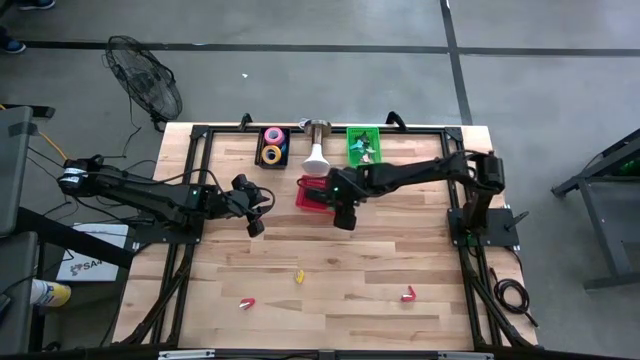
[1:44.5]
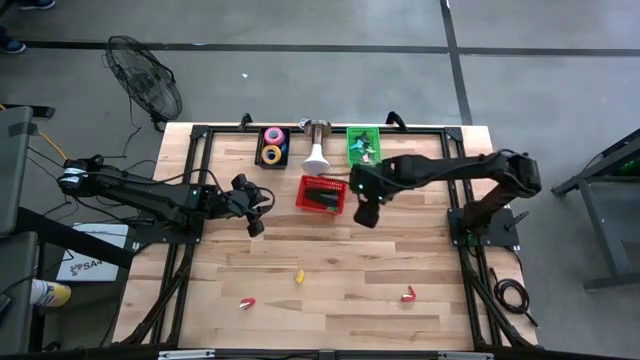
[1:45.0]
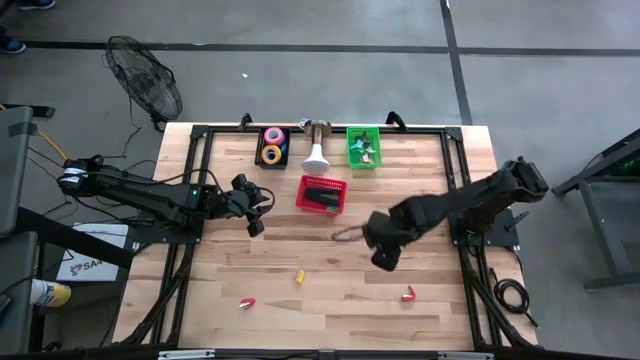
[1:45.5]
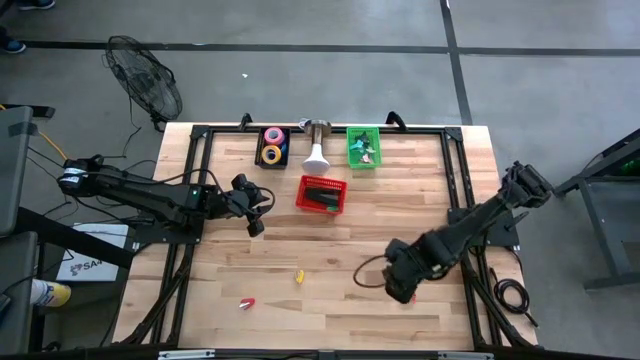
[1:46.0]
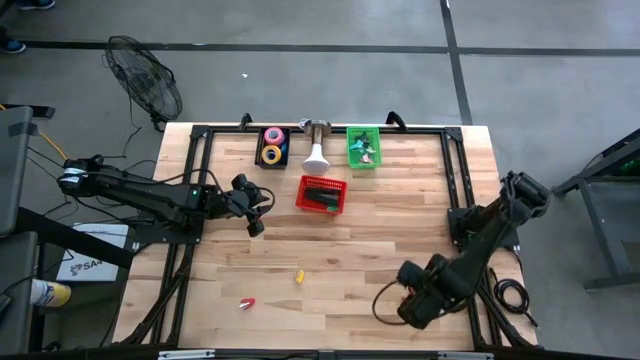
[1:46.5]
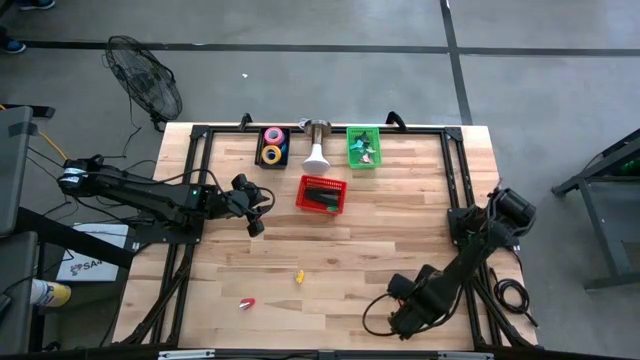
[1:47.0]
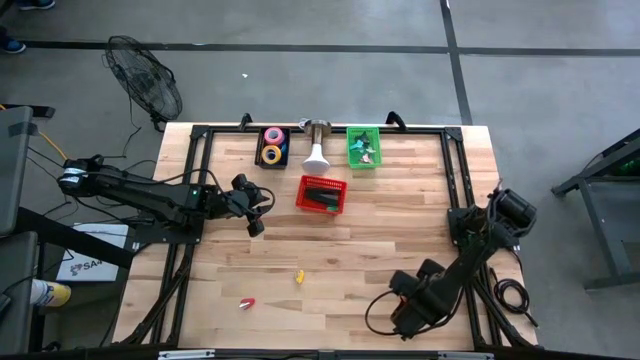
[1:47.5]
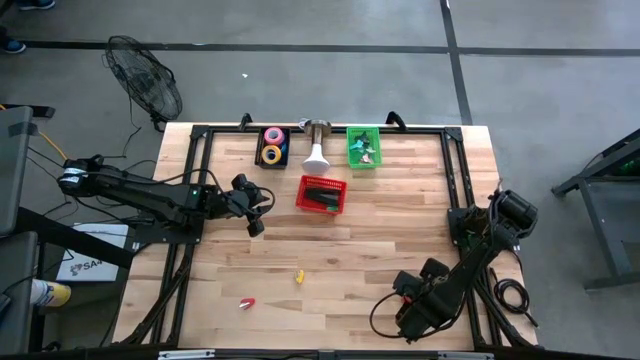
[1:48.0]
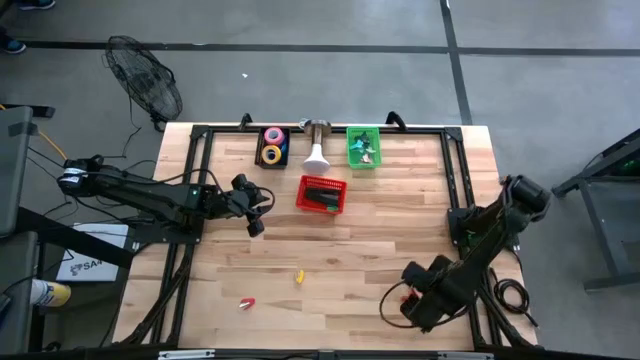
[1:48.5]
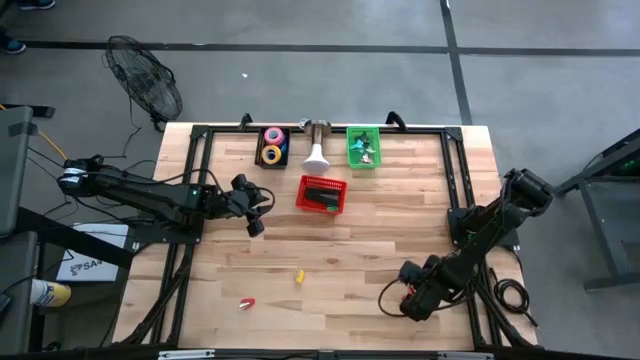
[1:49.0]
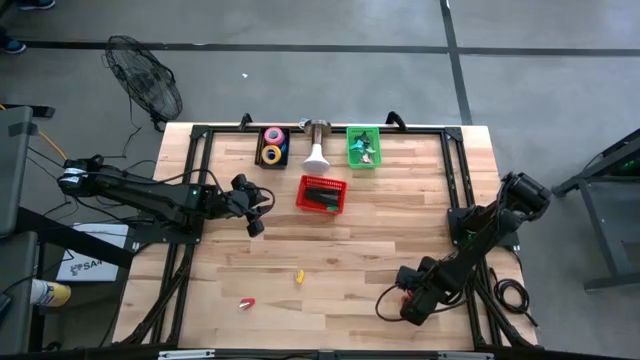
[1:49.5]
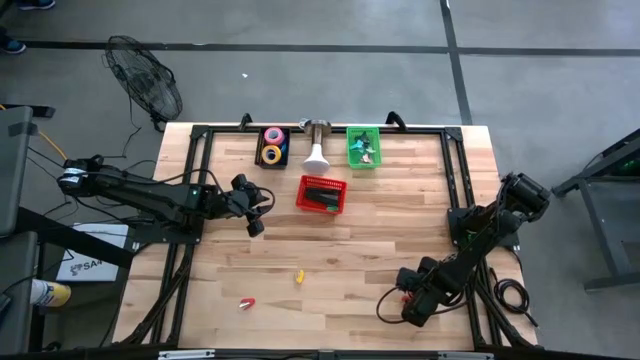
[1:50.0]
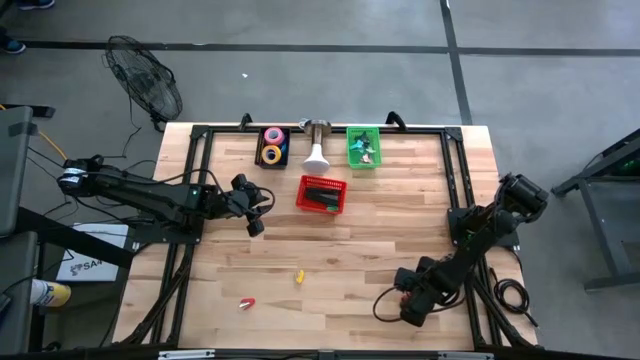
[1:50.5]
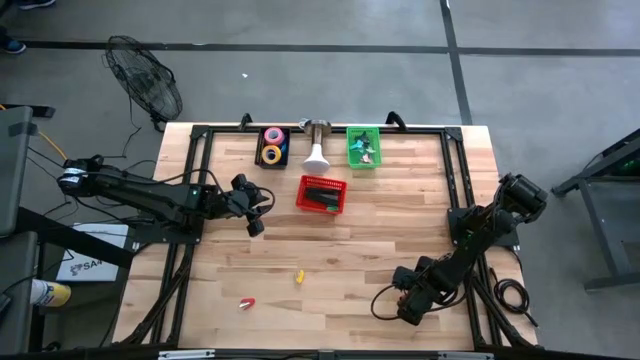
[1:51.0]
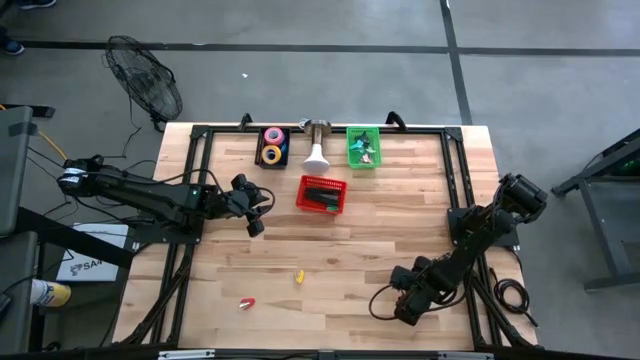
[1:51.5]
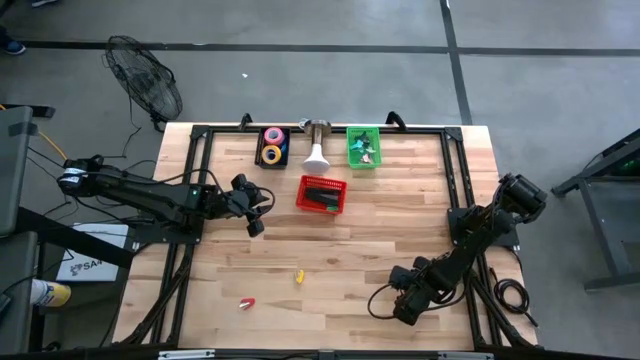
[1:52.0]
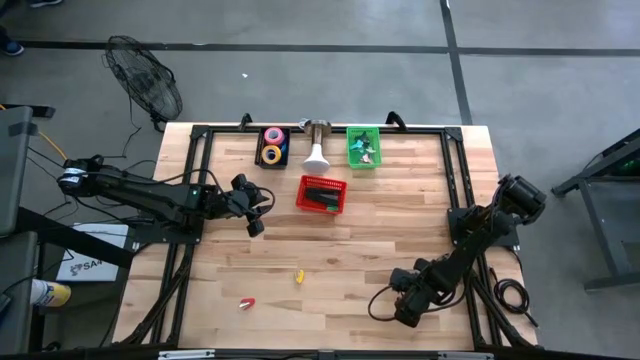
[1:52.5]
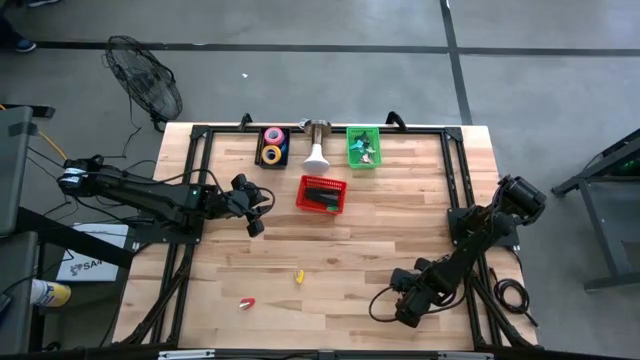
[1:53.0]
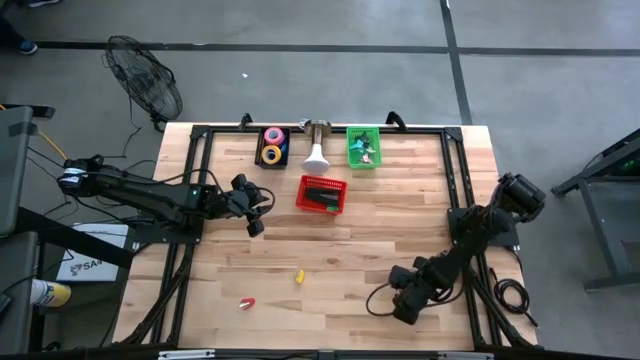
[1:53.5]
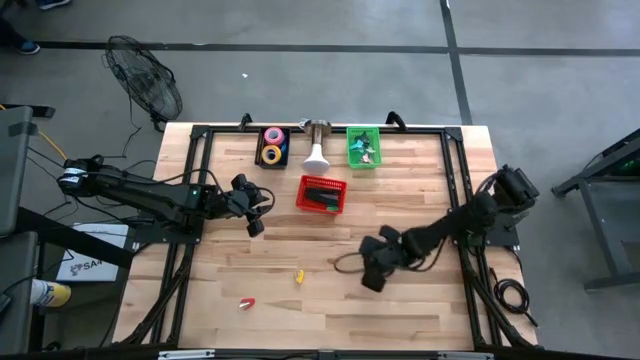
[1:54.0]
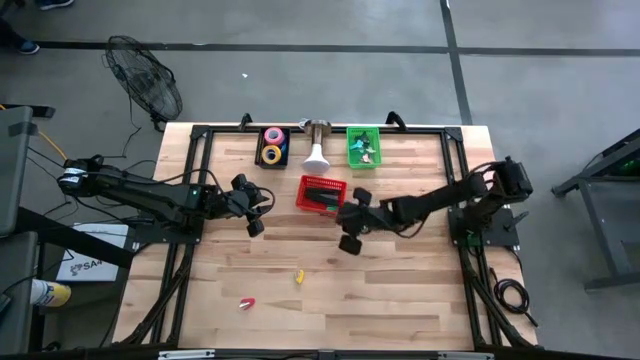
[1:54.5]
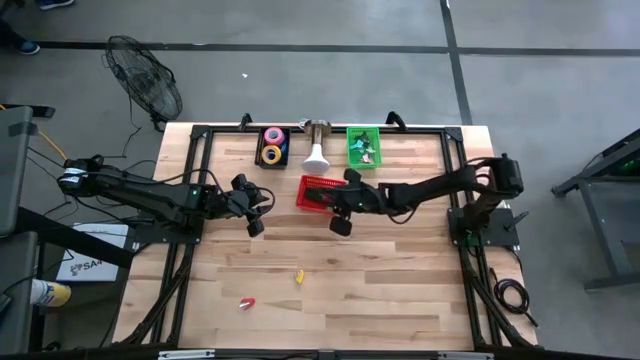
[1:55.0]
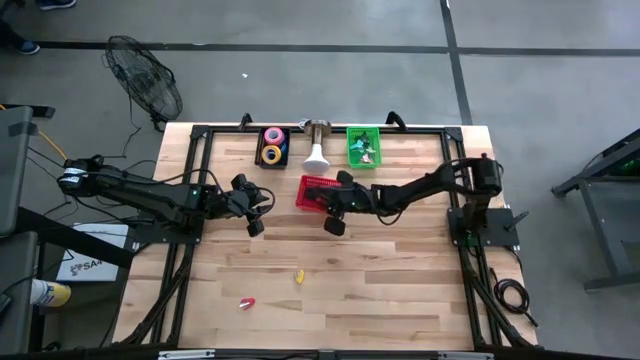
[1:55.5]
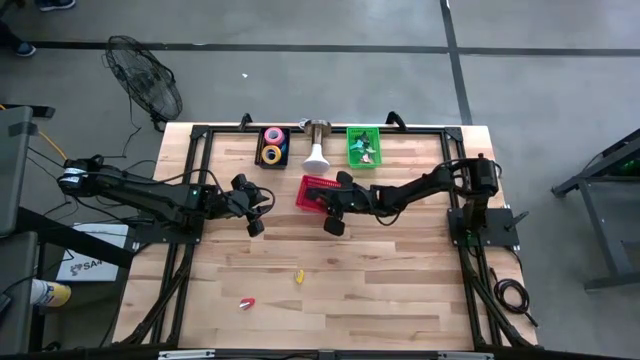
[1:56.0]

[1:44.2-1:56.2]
Task: Pick and place Stapler, Stapler remover, tape
Put the bottom right red stapler into the red basket

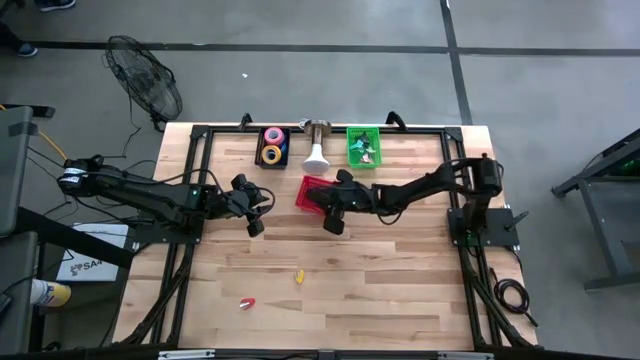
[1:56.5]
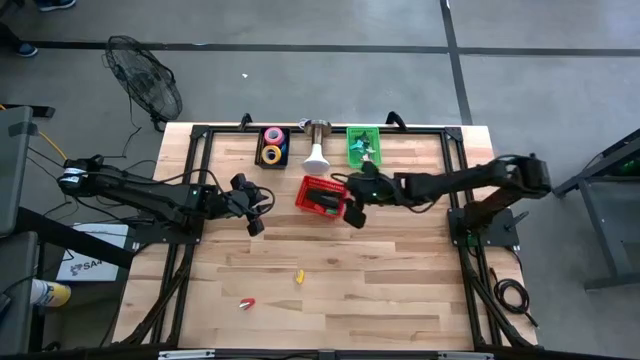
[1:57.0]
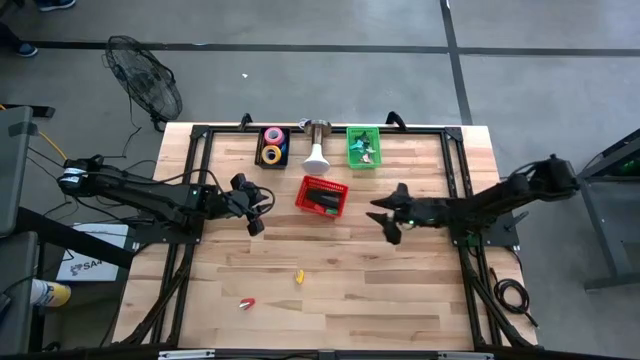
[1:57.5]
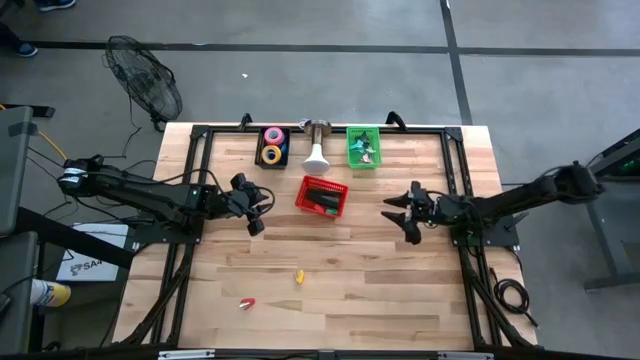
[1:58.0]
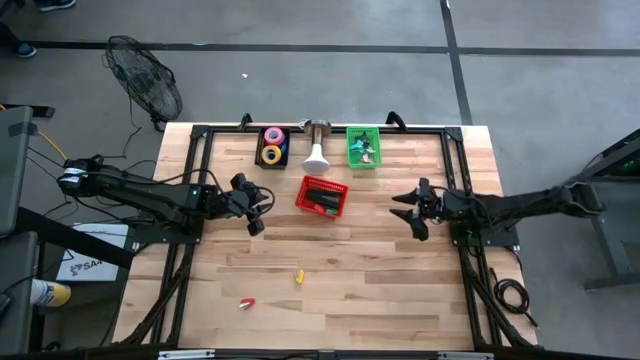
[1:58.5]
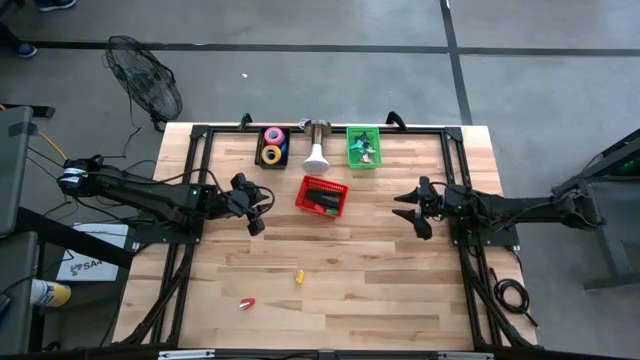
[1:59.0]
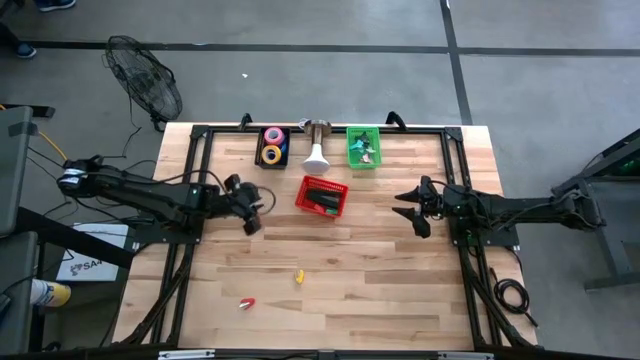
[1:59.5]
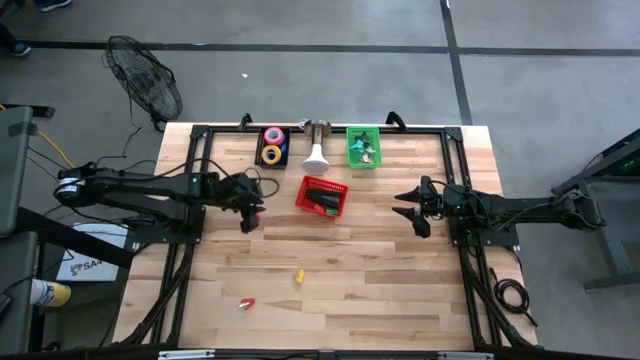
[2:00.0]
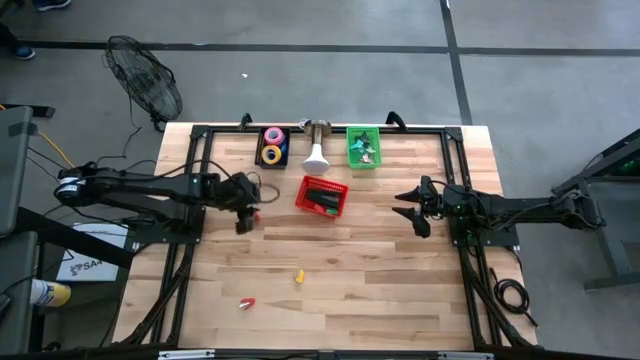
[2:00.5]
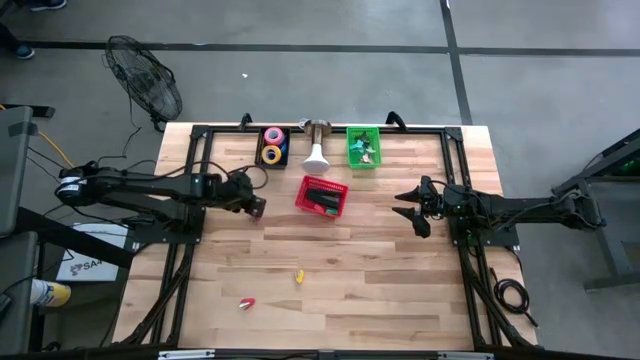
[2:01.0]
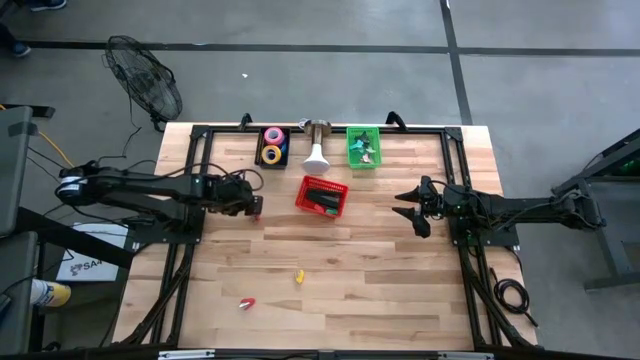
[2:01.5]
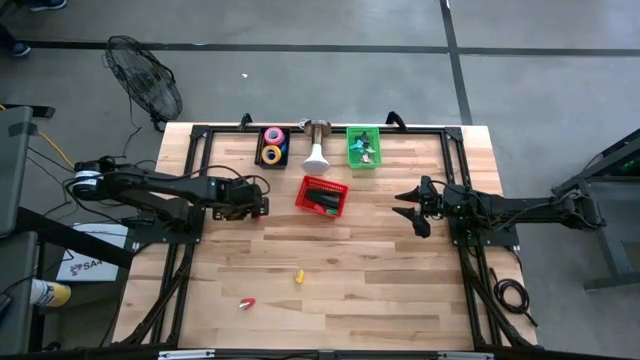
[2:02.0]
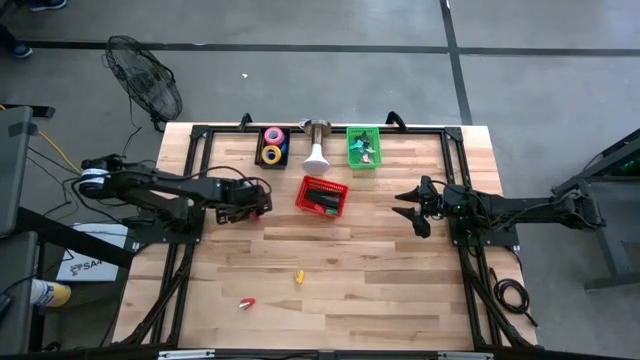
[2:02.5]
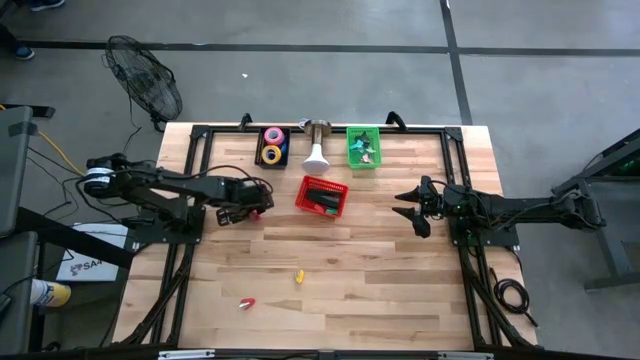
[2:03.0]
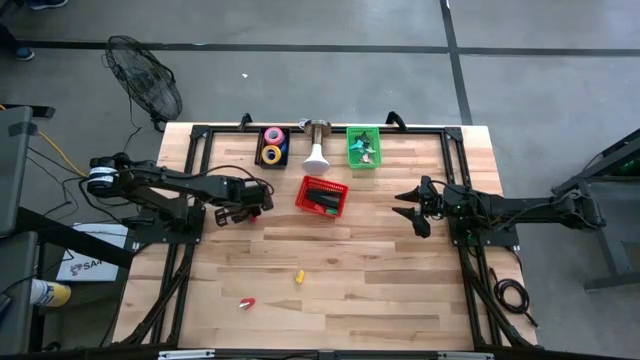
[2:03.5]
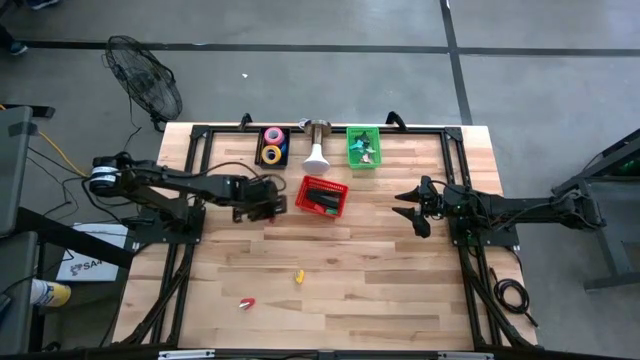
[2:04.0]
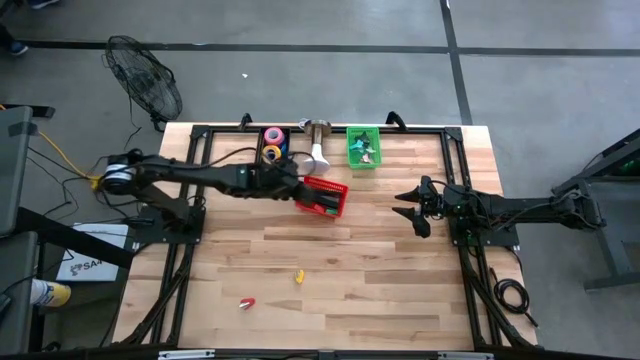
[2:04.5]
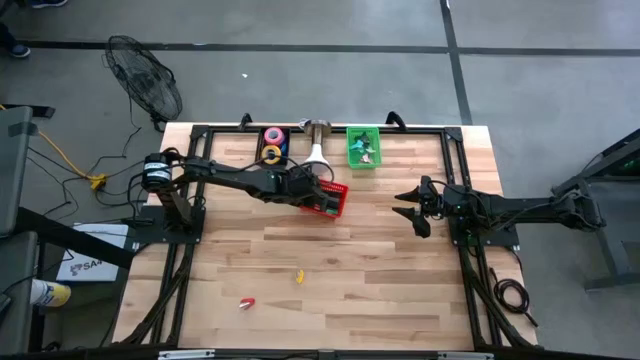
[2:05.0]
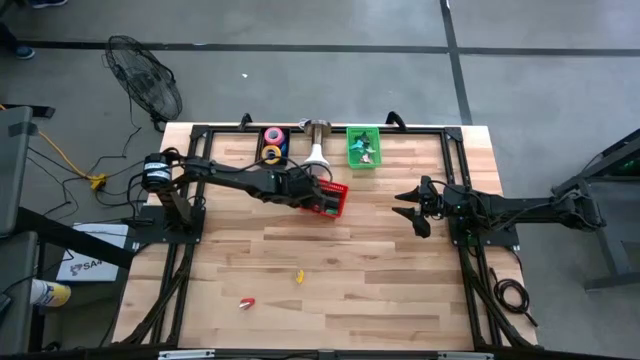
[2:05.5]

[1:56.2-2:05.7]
Put the top red stapler into the red basket

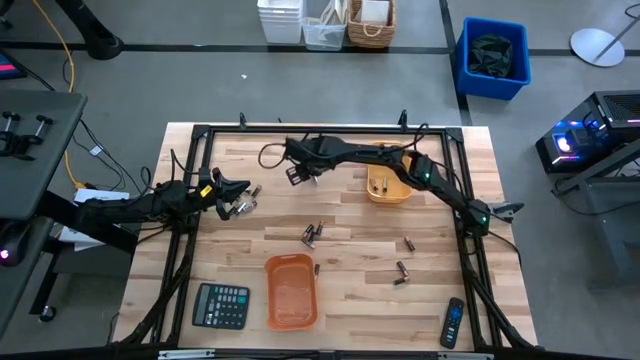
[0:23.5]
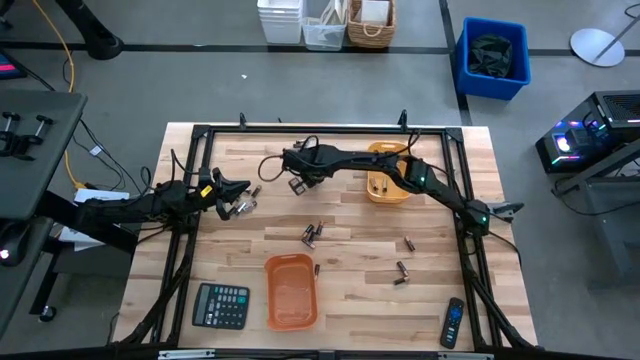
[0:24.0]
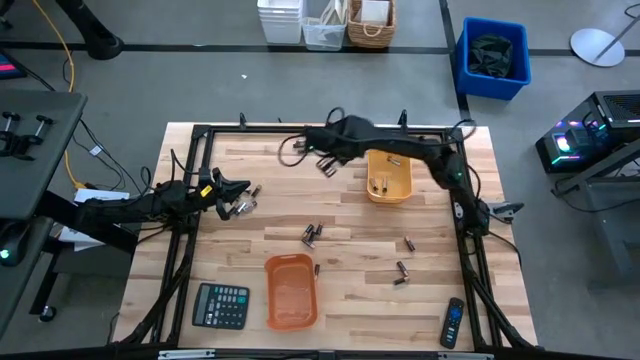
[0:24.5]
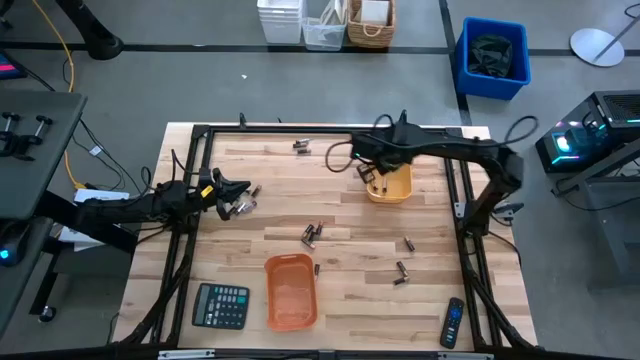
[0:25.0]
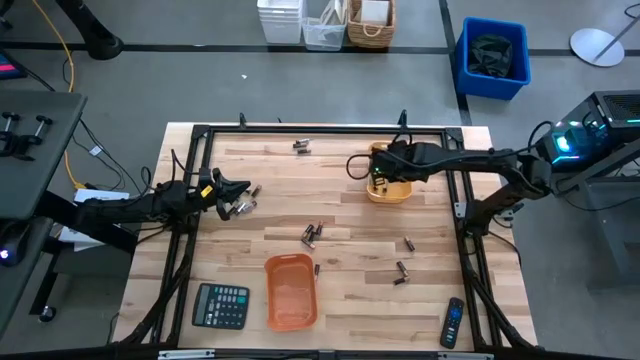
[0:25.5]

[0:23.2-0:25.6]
Task: Sort batteries
Put the silver battery into the yellow bin
